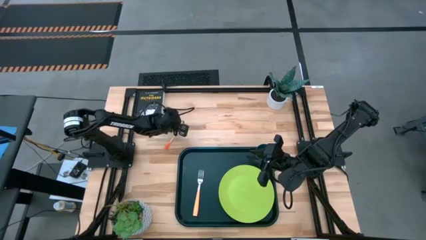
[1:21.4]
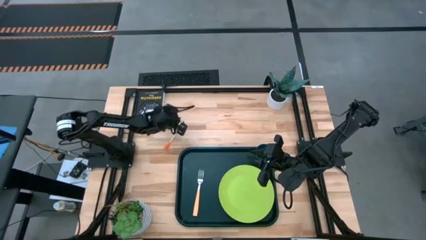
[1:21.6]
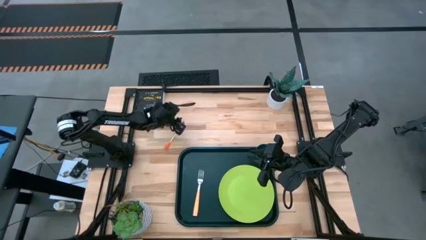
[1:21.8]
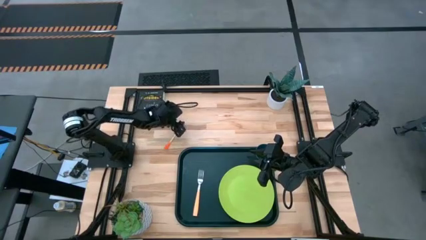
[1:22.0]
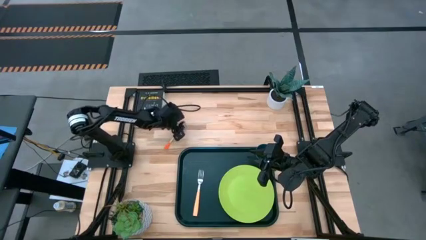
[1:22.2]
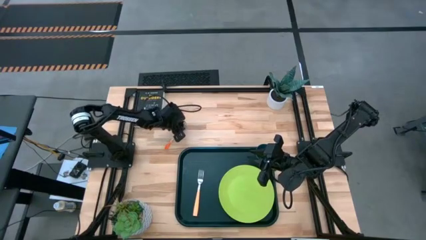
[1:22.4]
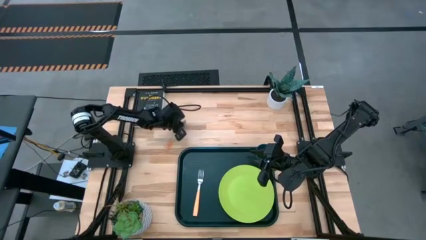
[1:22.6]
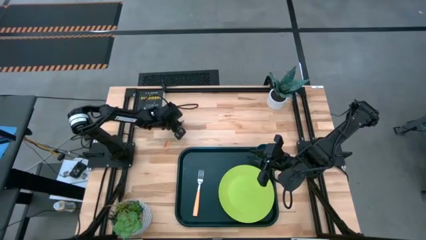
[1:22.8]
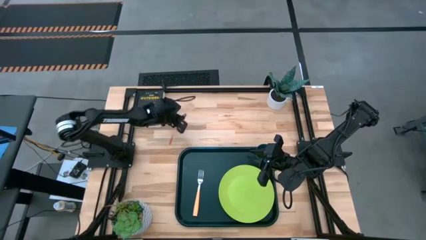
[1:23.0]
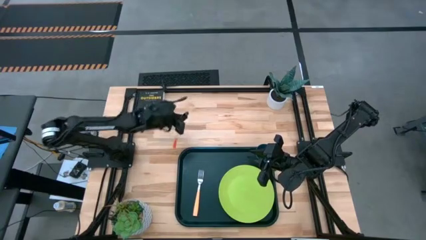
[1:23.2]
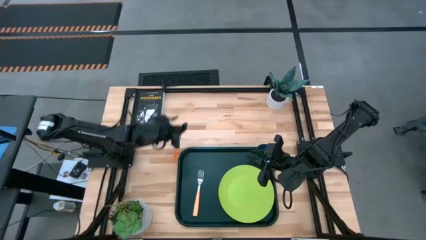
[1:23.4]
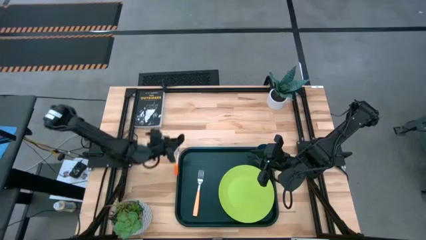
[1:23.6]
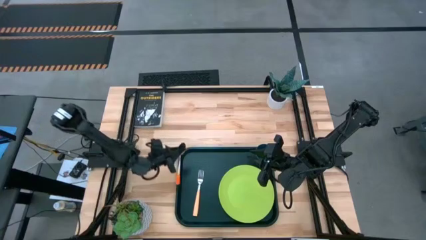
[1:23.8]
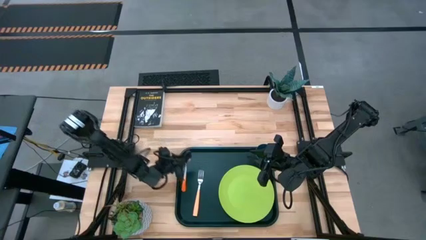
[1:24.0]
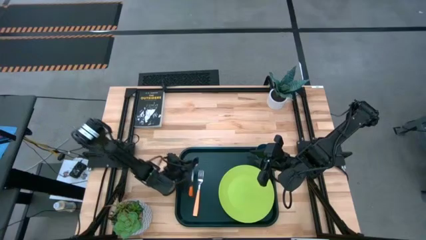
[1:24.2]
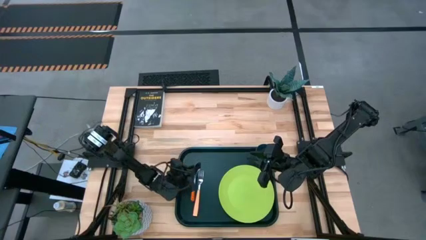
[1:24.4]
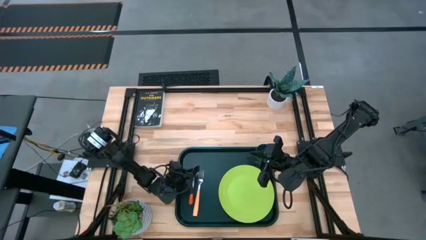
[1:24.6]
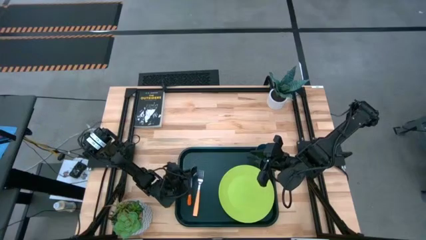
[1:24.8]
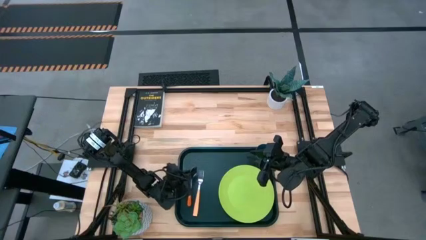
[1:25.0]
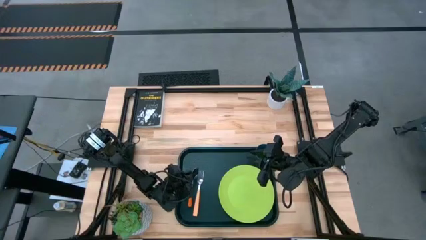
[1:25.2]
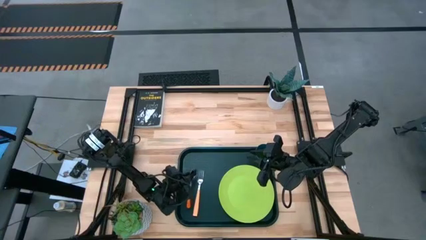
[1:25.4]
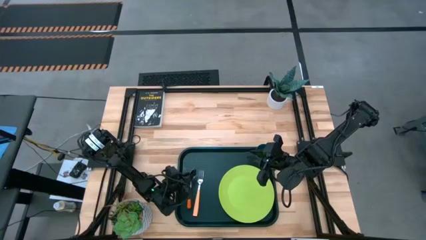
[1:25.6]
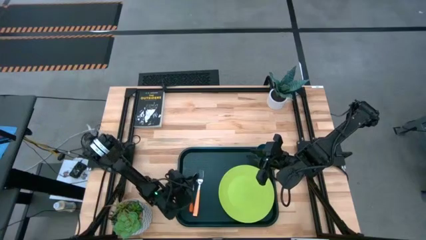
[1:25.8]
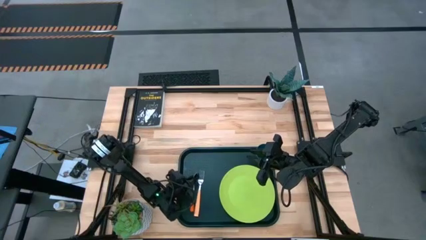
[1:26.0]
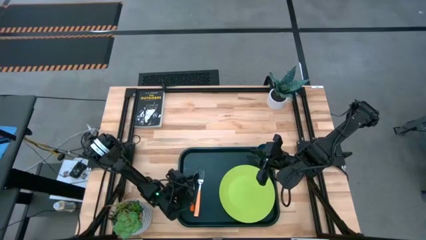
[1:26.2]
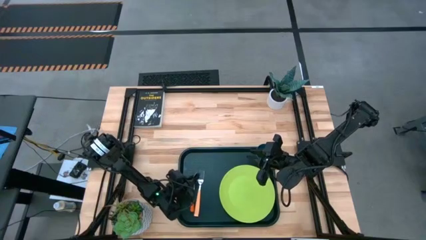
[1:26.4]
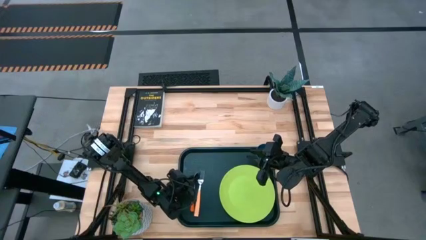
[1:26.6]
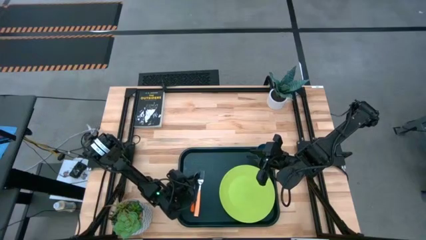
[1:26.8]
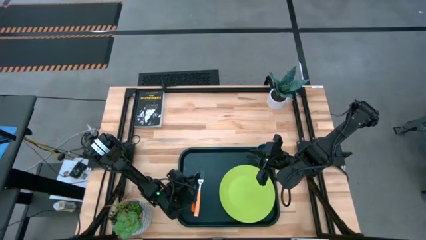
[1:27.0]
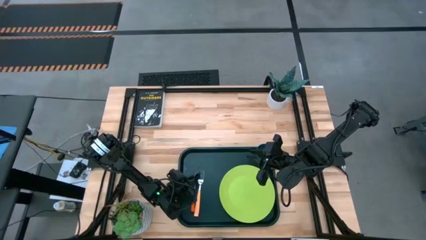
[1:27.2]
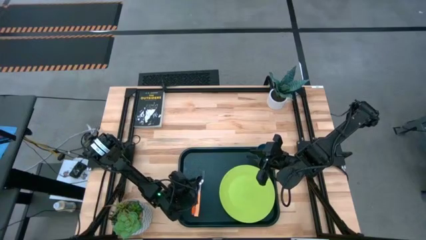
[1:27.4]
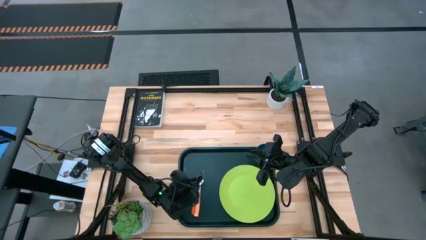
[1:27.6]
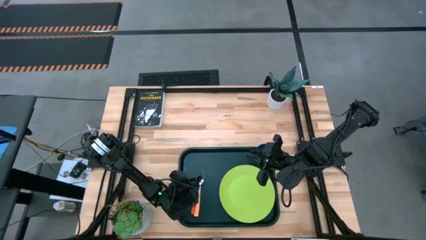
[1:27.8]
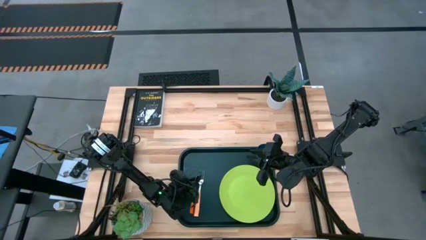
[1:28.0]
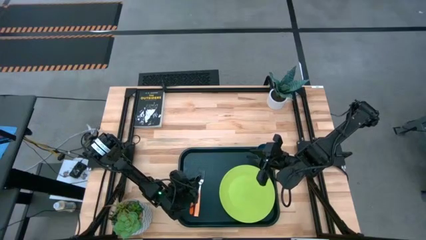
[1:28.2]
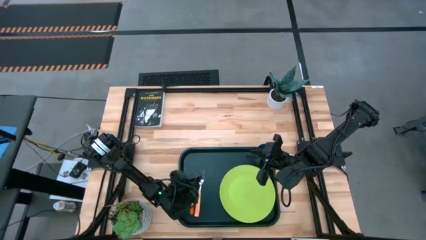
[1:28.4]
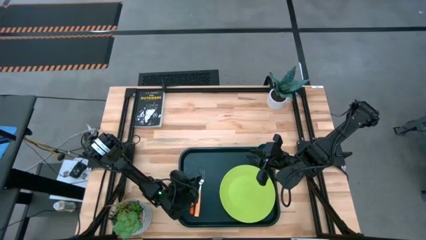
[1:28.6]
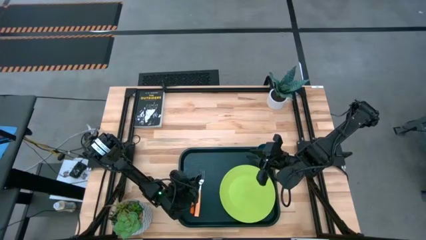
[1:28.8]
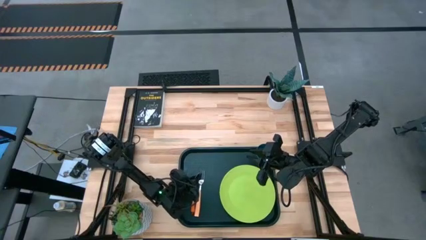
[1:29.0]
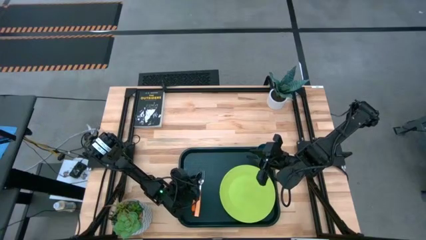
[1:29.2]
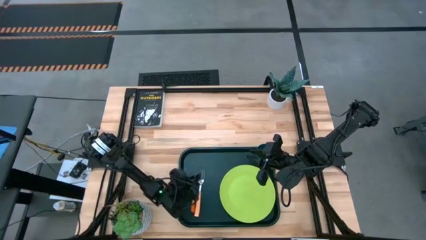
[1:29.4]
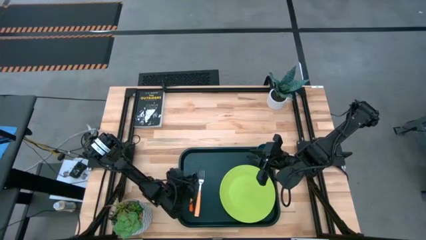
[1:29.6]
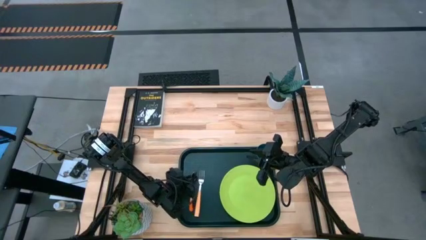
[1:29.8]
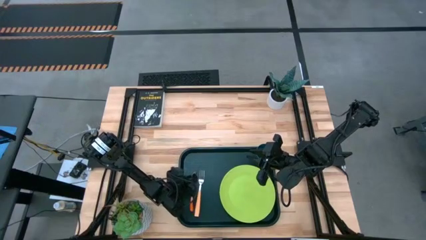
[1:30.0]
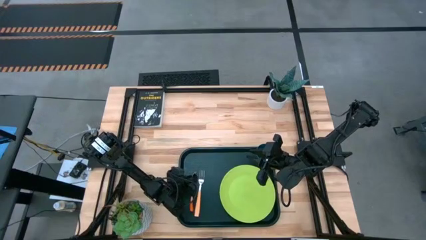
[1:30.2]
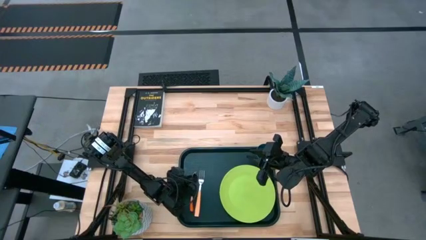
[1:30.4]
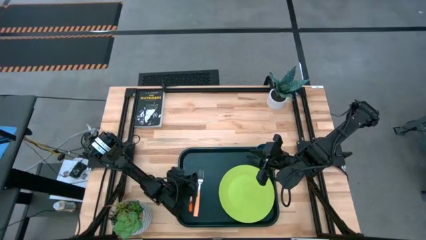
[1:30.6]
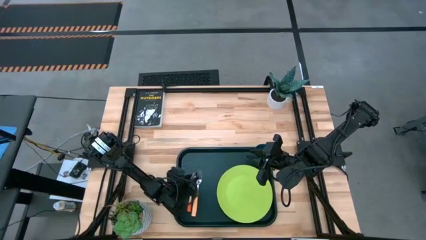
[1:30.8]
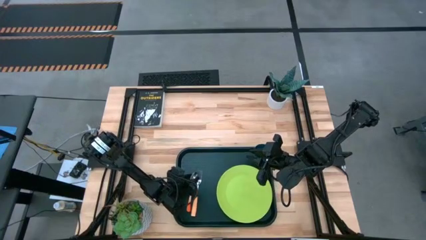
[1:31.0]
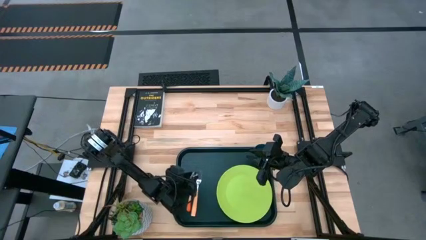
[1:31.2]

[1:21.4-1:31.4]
Task: Pick and place plate/cup/fork/spoon on tray
Put the orange spoon on the black serving tray to the left of the light orange fork

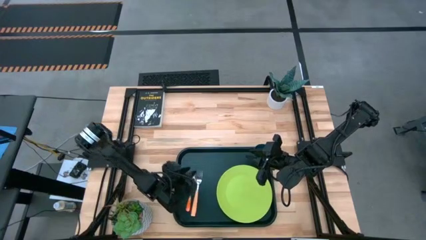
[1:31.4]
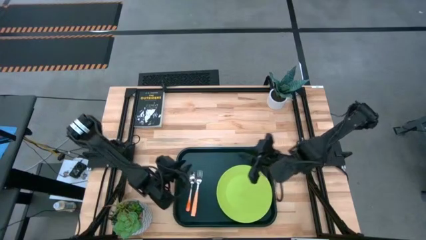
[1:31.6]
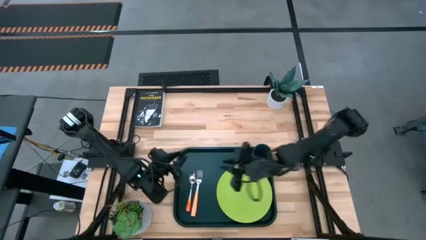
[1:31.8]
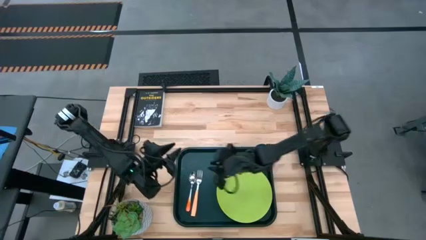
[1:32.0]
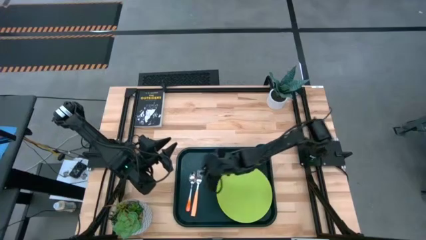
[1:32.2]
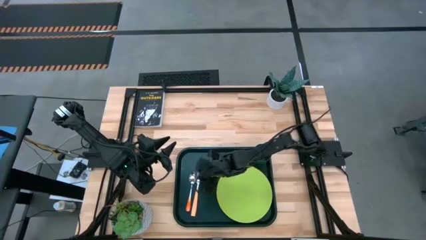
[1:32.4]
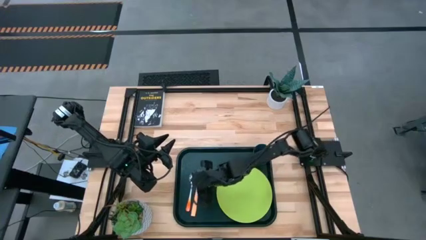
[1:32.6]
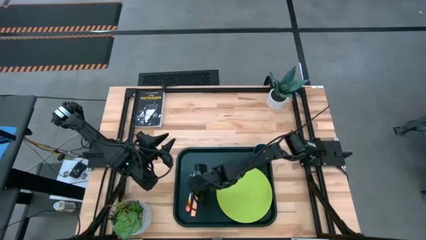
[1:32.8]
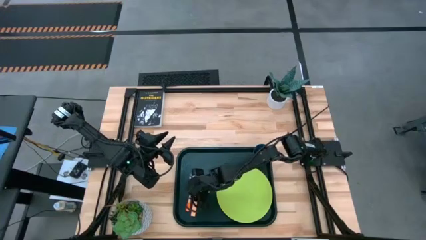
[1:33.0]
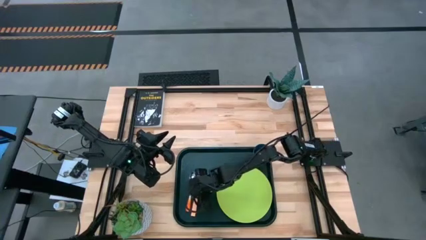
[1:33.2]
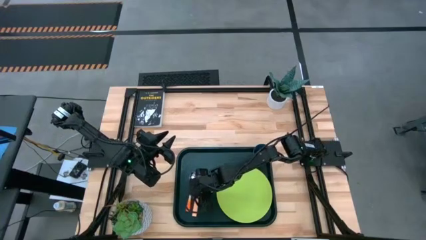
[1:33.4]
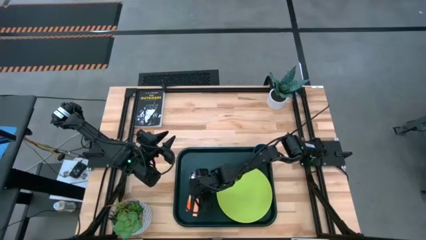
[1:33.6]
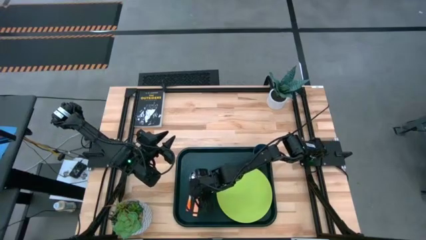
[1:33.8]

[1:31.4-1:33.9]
Adjust the light orange fork on the black serving tray

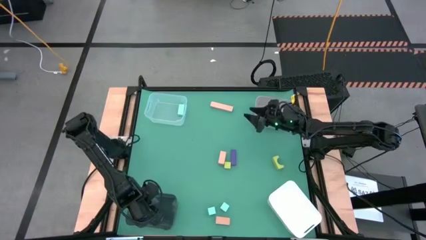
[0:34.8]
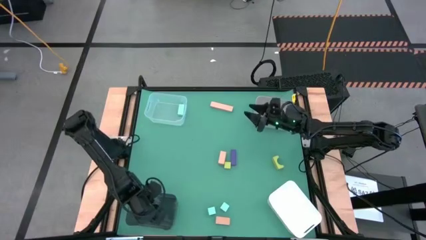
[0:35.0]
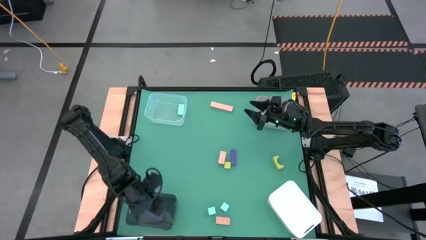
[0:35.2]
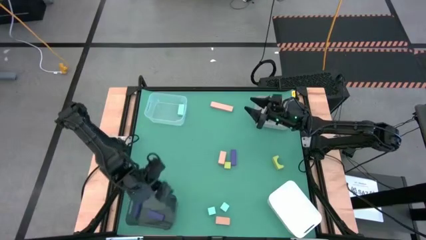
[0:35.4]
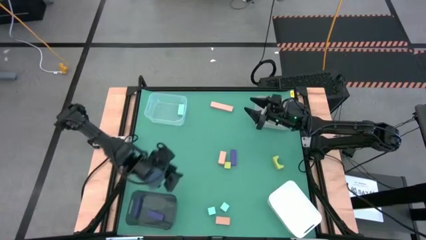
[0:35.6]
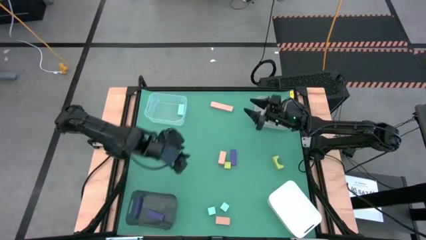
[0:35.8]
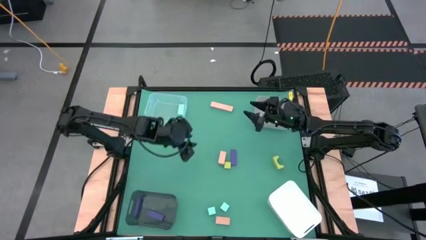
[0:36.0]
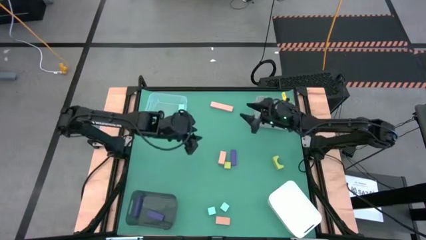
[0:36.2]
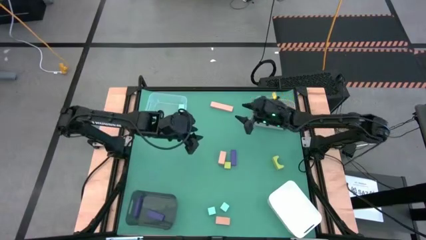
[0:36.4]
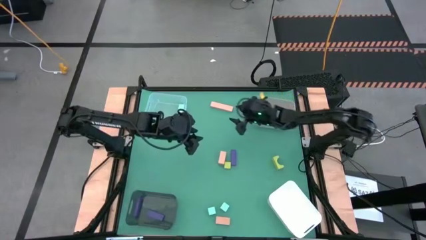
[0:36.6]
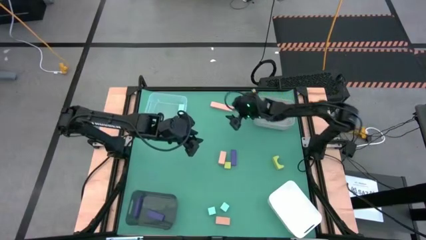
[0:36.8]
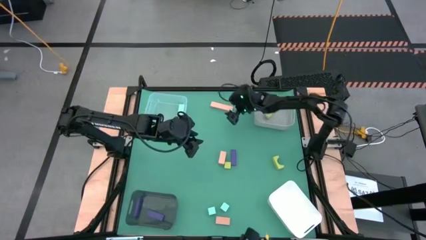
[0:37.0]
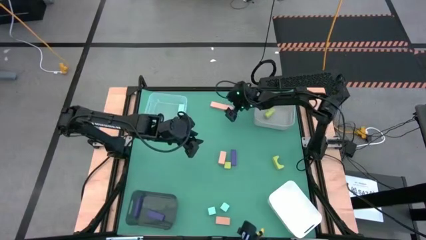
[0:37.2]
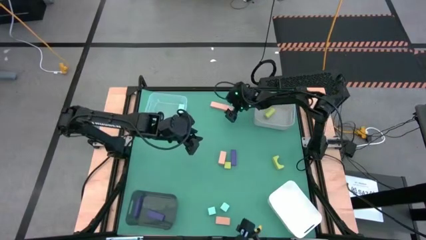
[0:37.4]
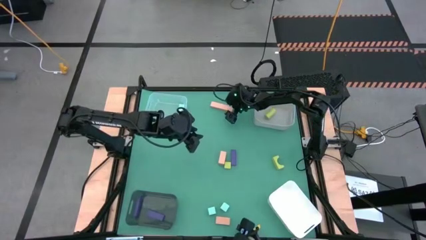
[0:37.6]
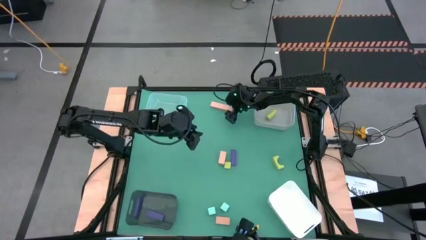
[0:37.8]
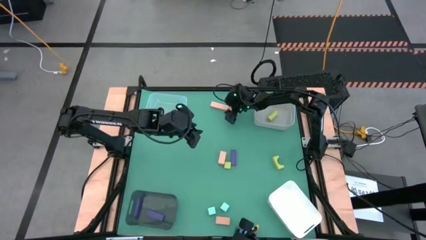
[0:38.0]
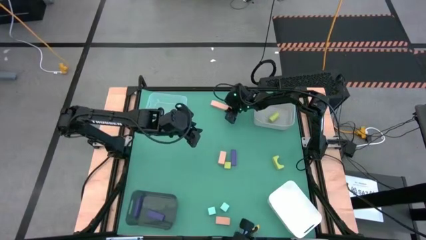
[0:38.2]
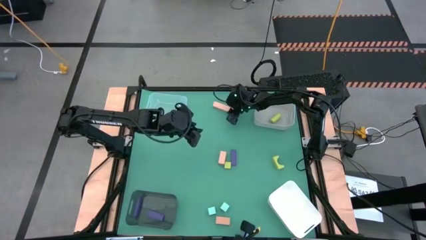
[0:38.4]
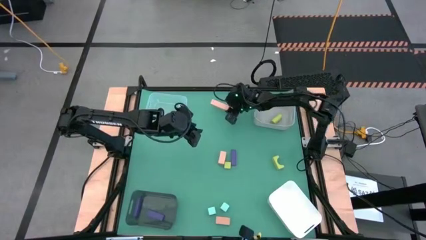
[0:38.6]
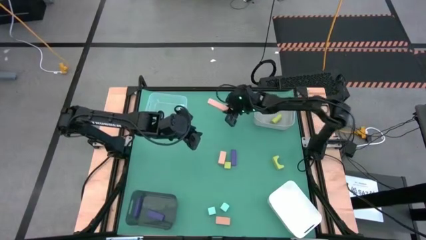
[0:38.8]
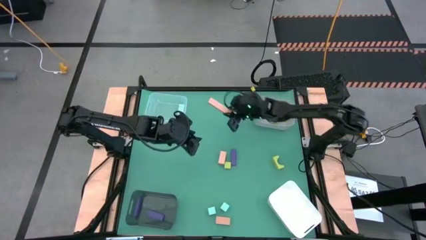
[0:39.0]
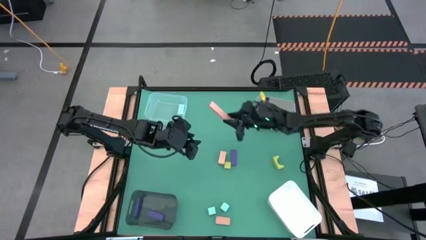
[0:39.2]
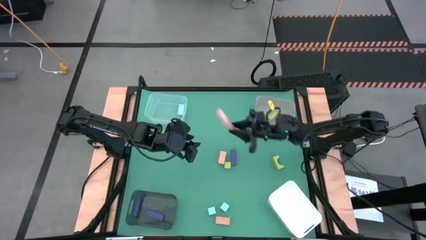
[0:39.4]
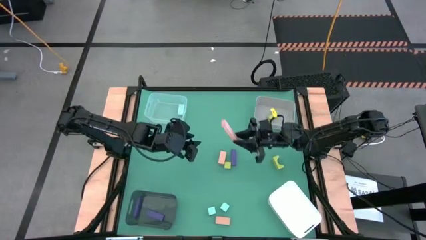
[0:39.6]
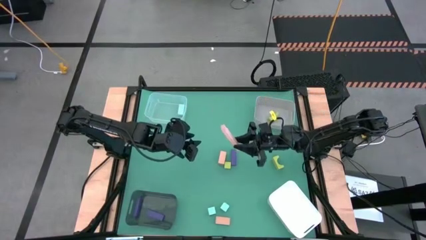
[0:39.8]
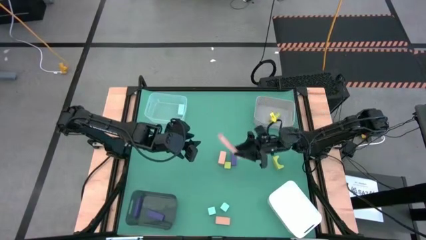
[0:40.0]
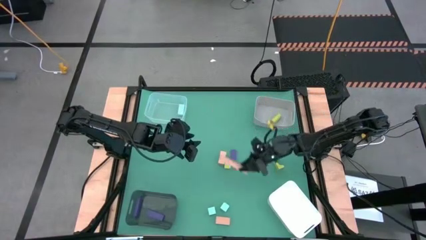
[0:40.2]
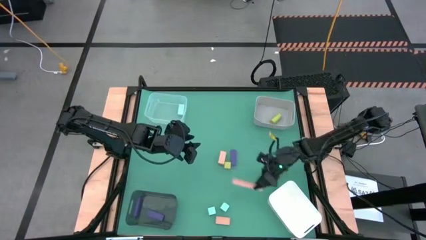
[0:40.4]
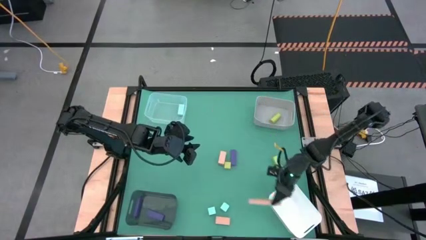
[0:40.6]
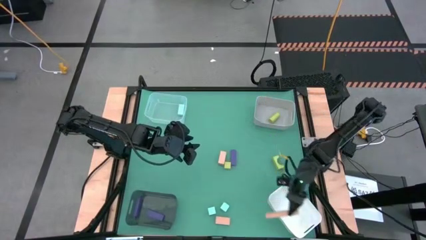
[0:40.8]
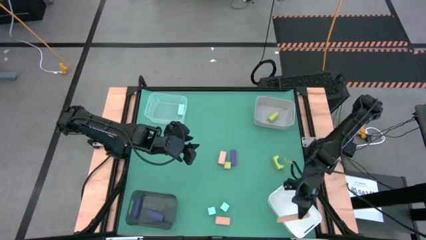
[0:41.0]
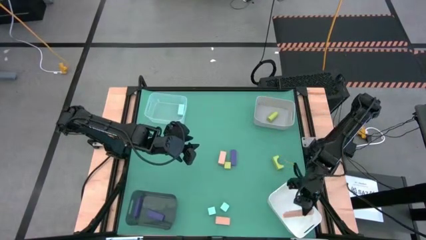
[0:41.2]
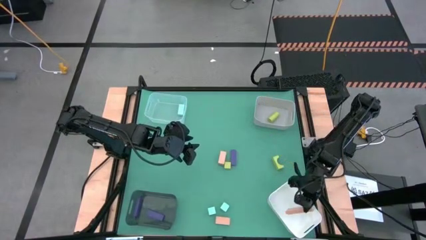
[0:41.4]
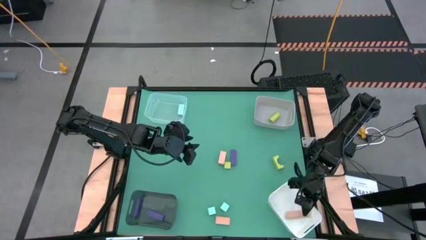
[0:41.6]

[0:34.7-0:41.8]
Task: Sort & place blocks by color
Put the top brown block into the white bin
